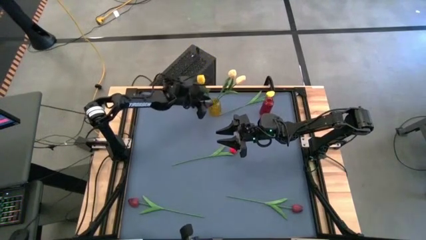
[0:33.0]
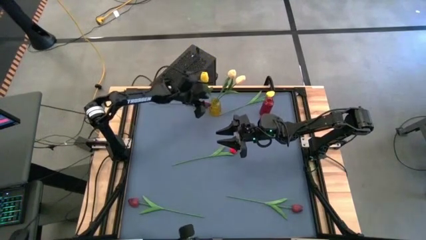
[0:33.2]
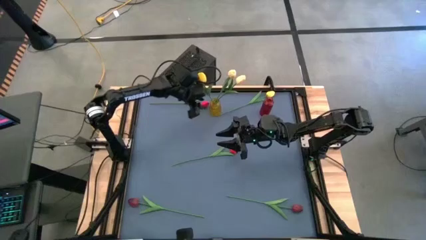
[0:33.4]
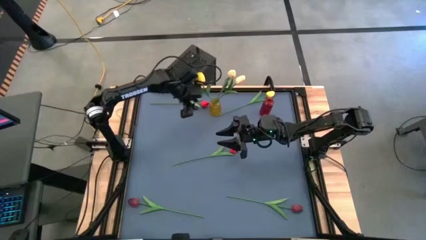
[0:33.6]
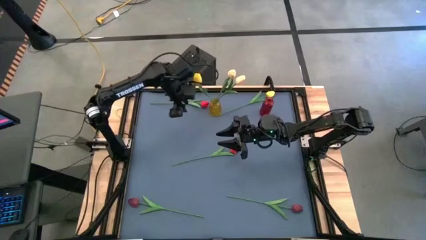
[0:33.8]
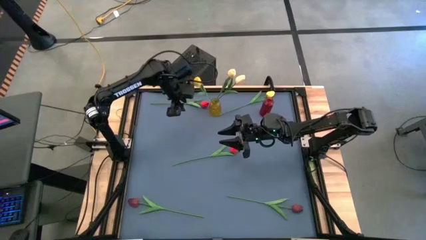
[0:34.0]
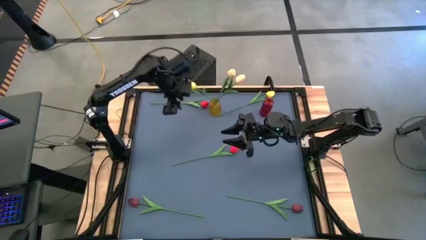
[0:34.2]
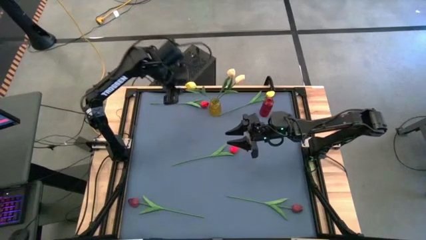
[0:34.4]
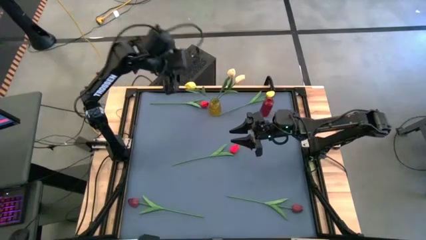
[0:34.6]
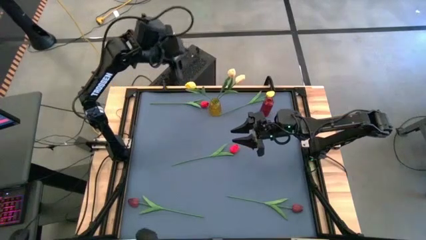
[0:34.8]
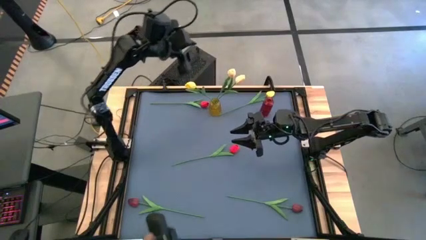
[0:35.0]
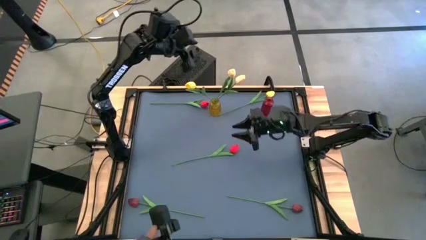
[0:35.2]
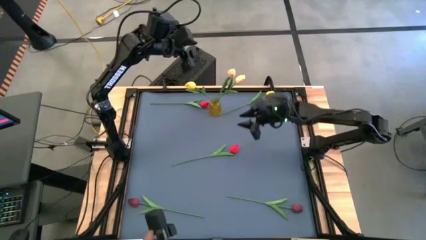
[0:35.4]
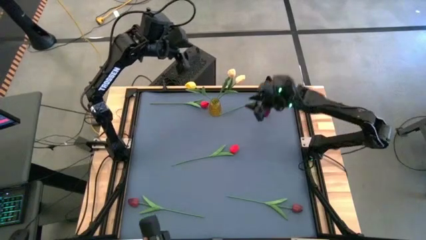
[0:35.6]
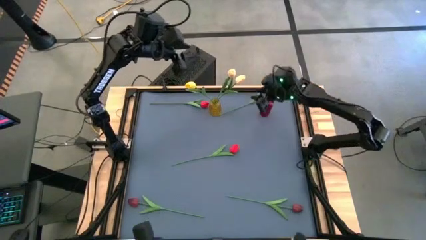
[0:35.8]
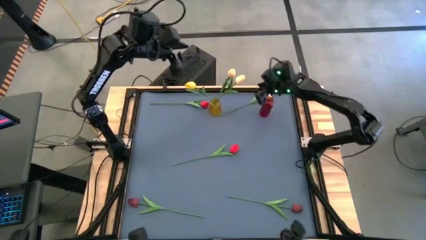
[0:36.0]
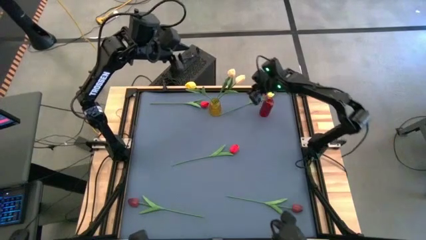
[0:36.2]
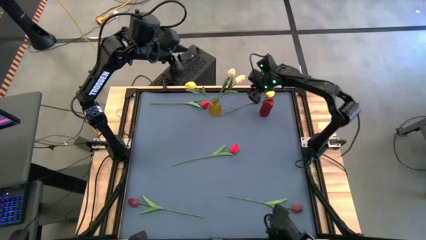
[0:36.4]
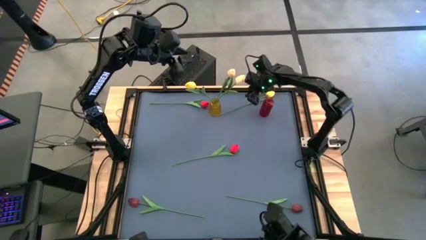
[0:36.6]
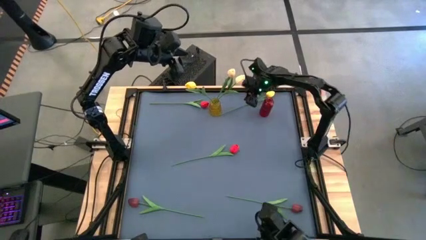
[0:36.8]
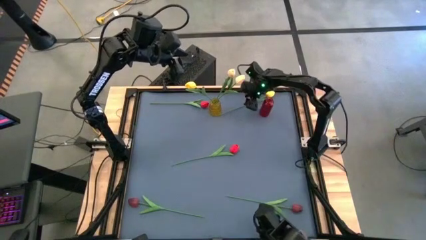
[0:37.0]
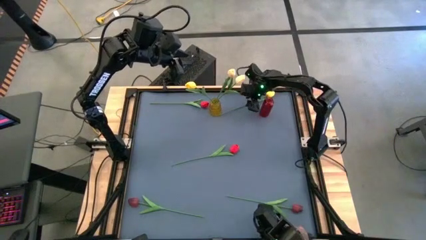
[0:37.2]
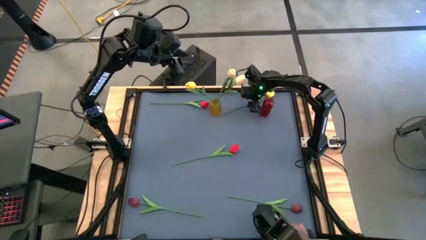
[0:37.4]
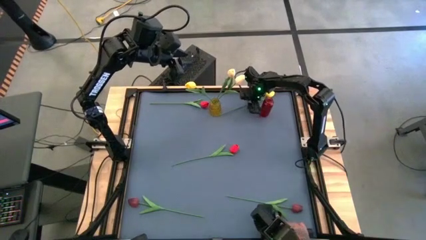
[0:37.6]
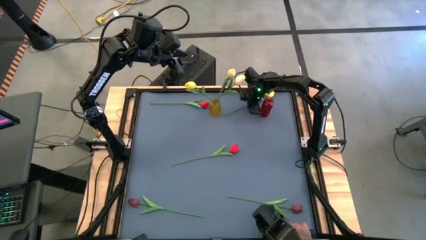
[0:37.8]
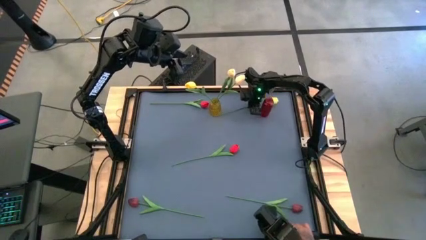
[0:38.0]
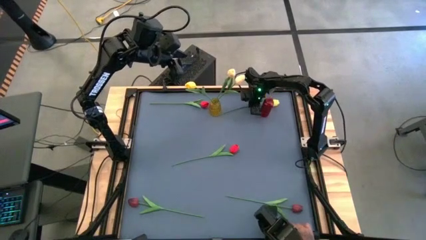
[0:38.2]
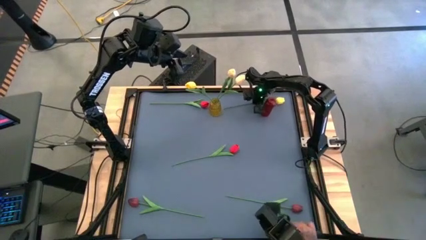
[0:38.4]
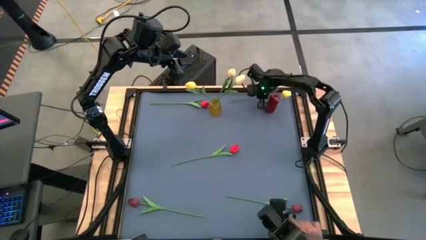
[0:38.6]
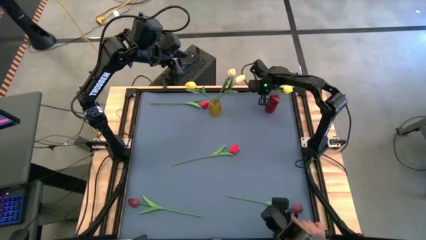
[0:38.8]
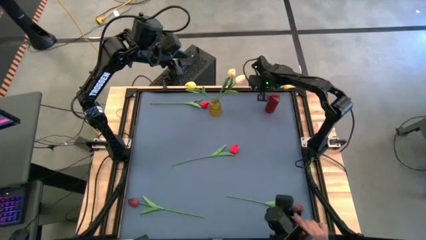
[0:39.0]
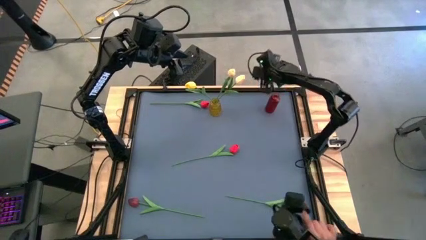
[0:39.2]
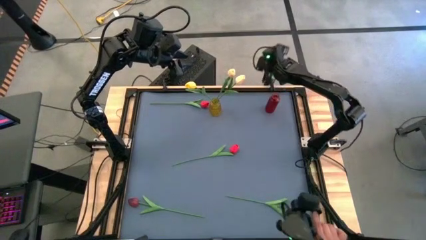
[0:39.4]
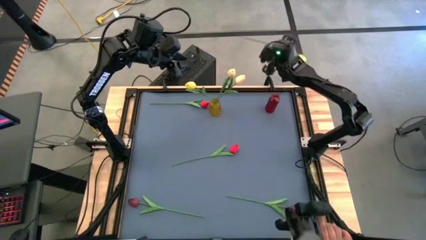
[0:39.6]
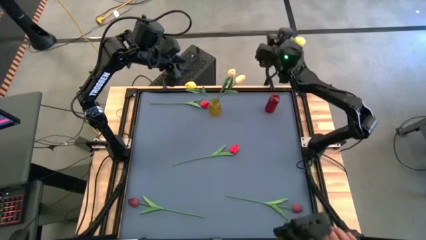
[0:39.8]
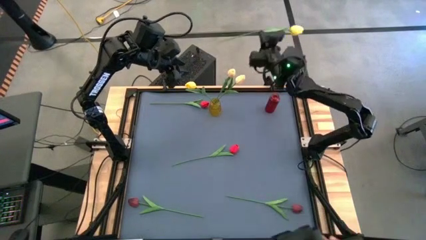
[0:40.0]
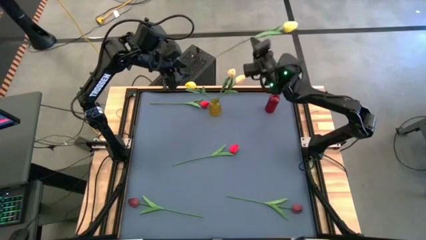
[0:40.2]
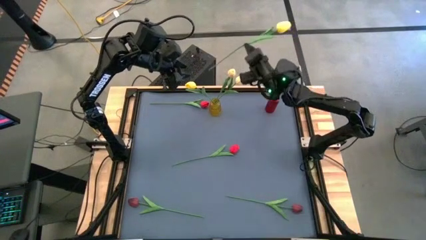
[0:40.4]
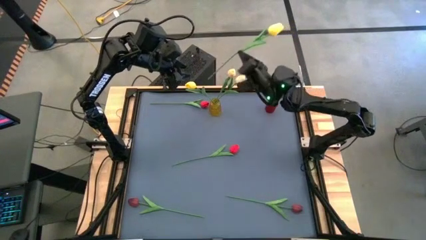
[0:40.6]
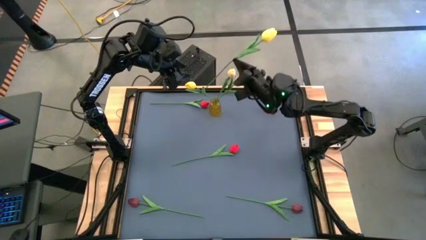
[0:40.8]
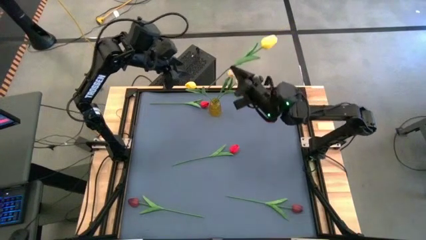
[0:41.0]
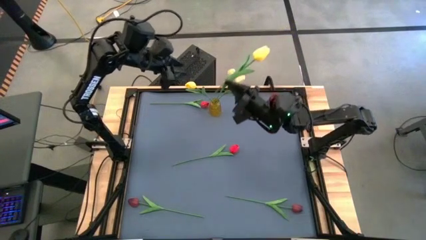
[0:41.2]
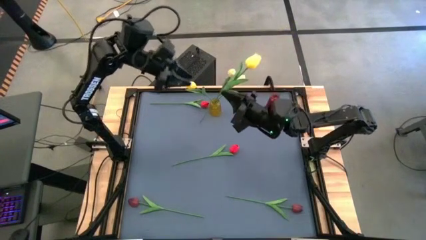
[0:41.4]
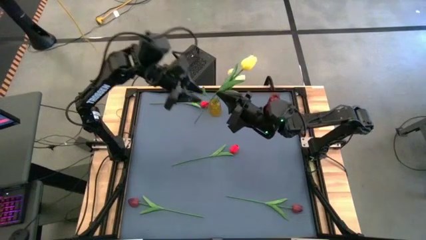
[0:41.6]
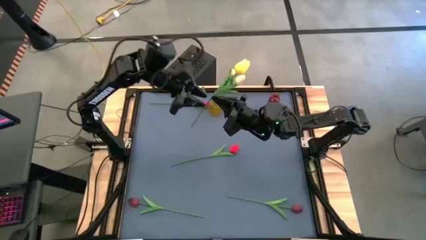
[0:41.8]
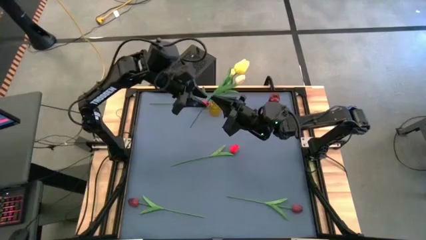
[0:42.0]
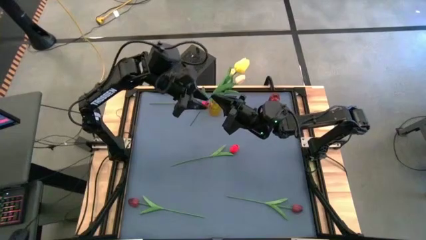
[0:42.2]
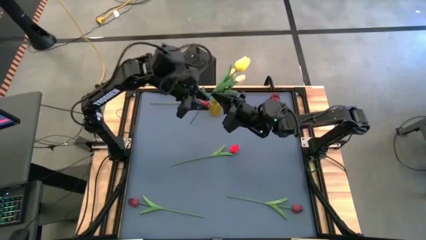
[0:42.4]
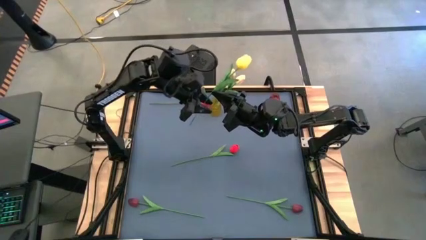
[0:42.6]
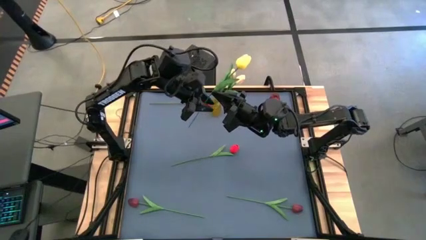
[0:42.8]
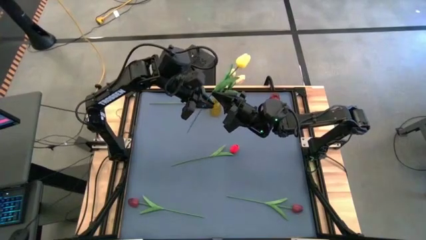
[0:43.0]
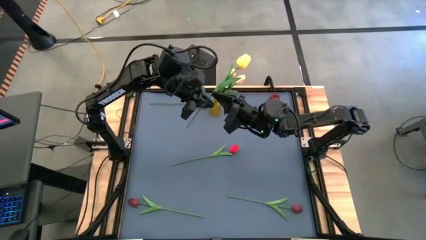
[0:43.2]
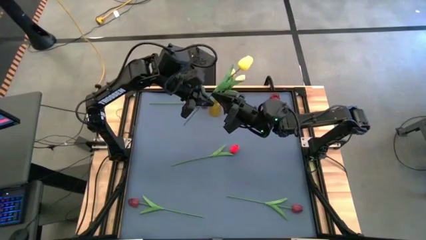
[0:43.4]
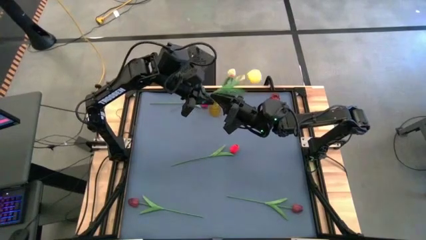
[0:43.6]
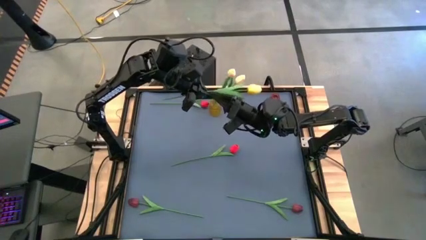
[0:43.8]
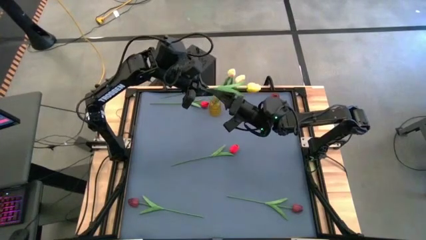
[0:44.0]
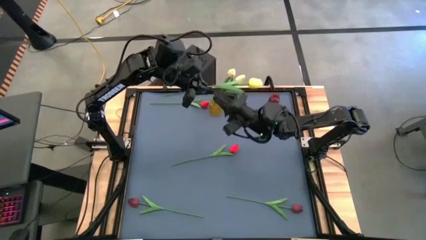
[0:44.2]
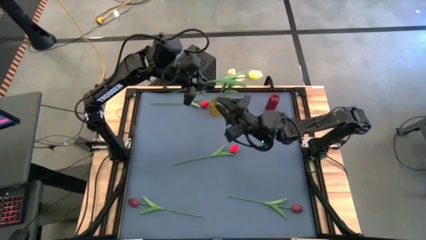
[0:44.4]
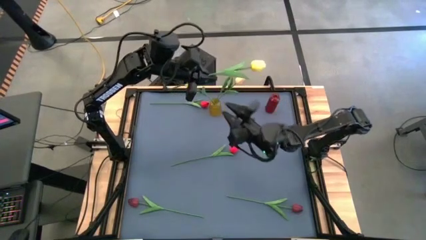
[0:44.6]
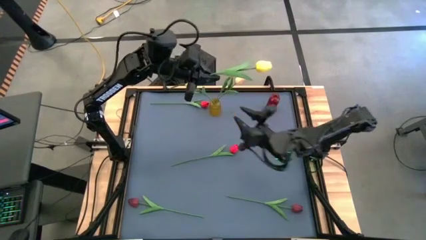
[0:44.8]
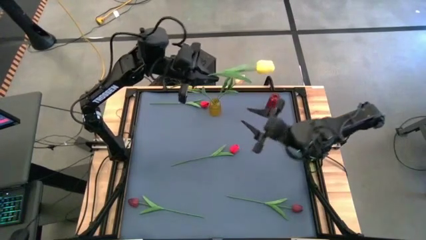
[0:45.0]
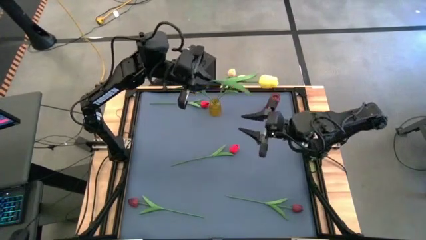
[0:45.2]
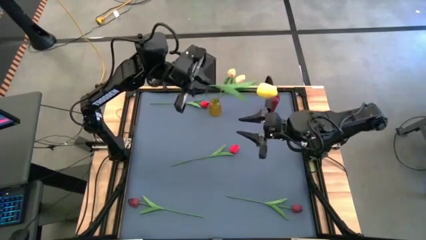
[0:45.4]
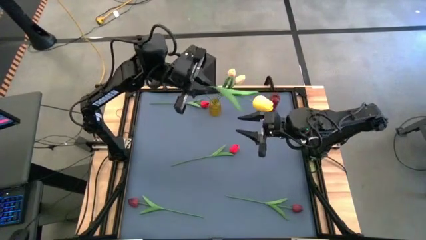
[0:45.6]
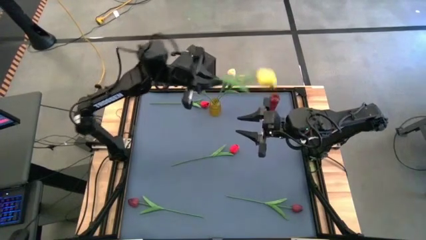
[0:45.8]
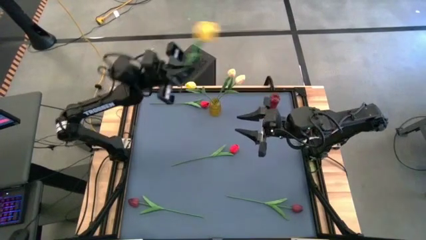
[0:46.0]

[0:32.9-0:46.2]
Task: Sort flowers into vase by color
Put the yellow flower into the yellow vase
